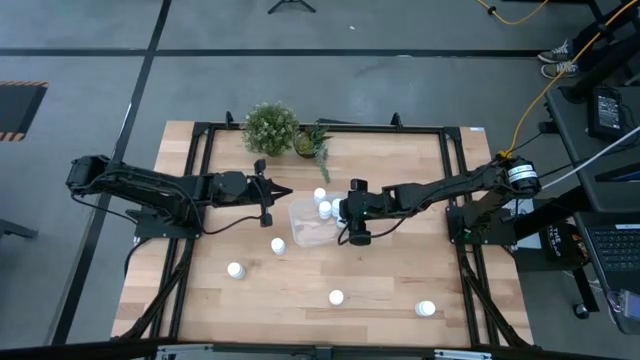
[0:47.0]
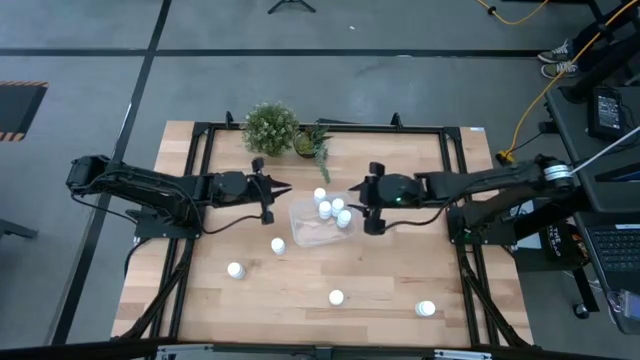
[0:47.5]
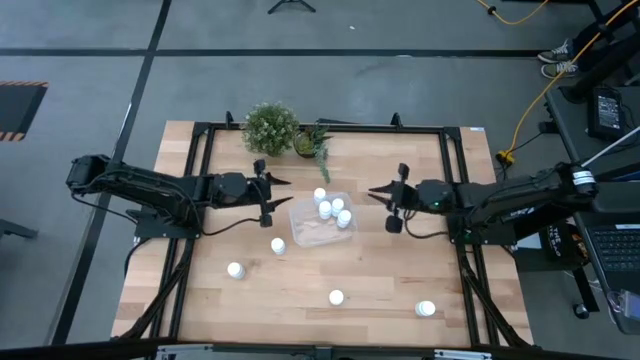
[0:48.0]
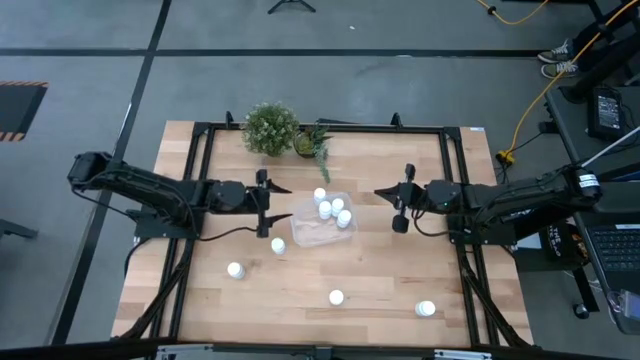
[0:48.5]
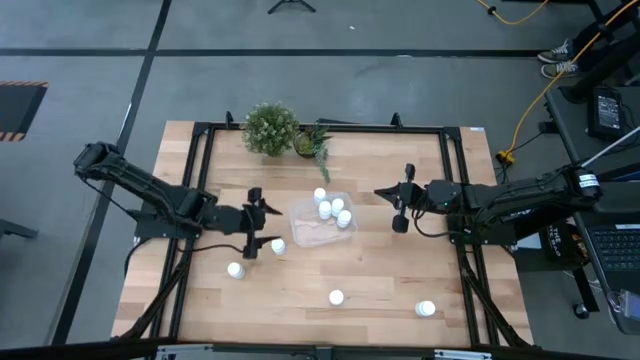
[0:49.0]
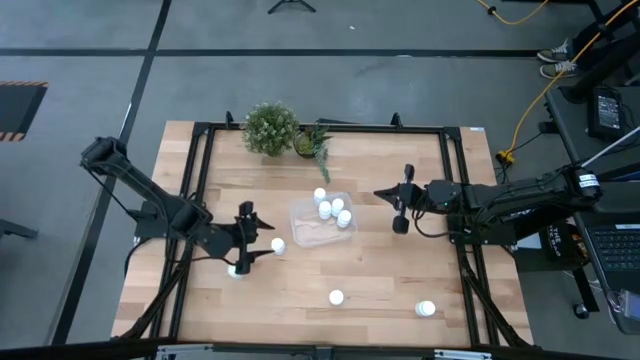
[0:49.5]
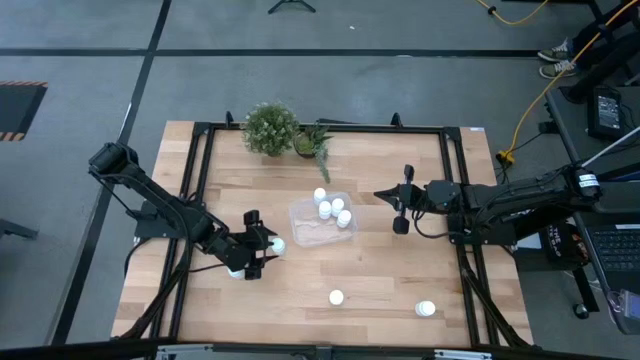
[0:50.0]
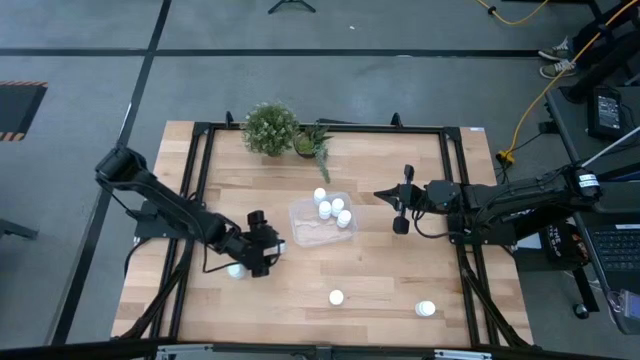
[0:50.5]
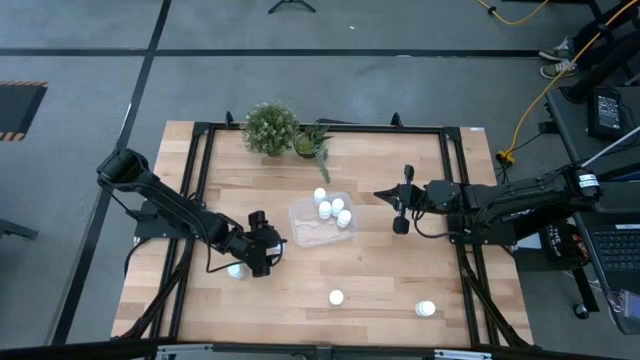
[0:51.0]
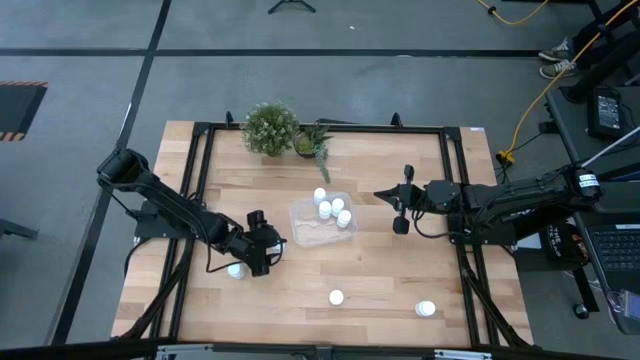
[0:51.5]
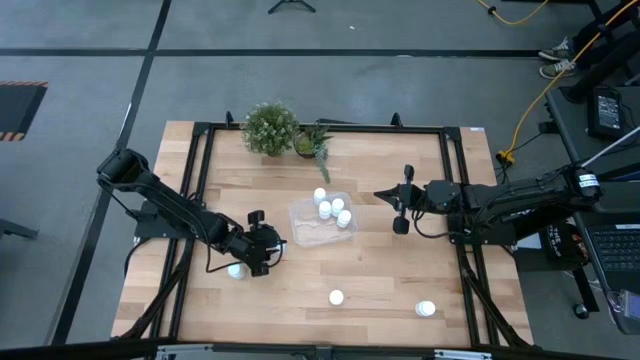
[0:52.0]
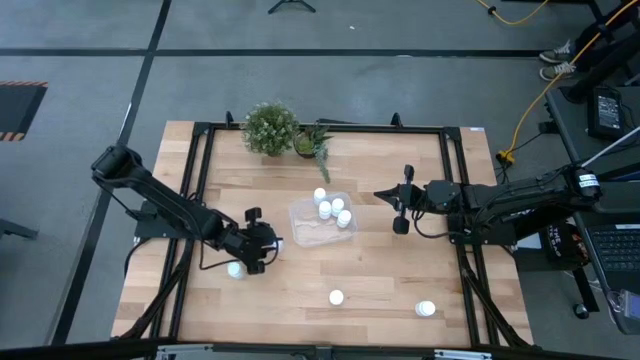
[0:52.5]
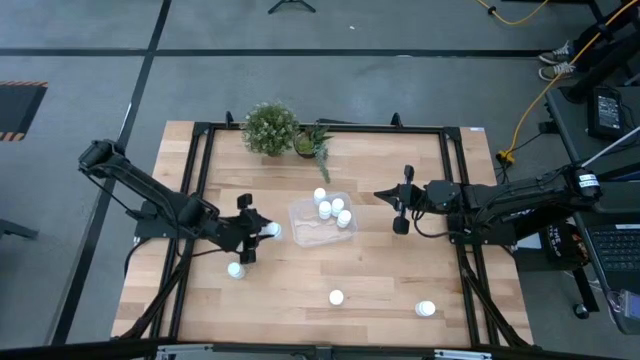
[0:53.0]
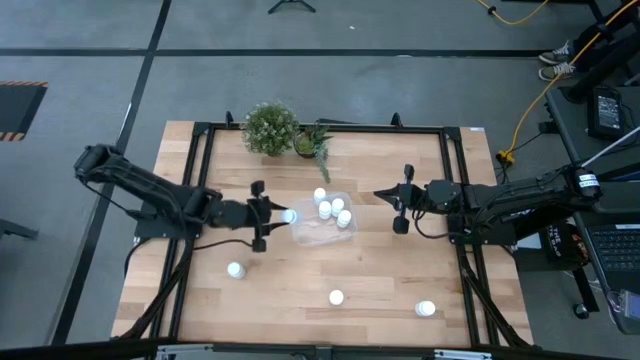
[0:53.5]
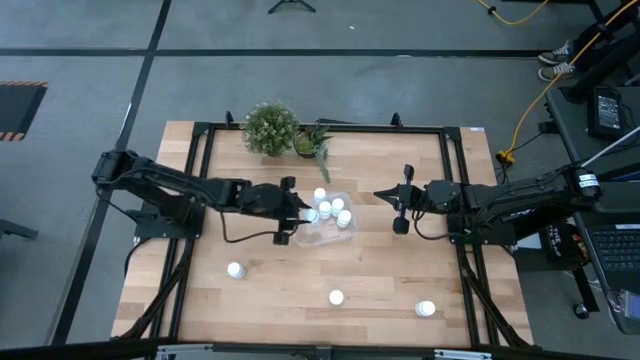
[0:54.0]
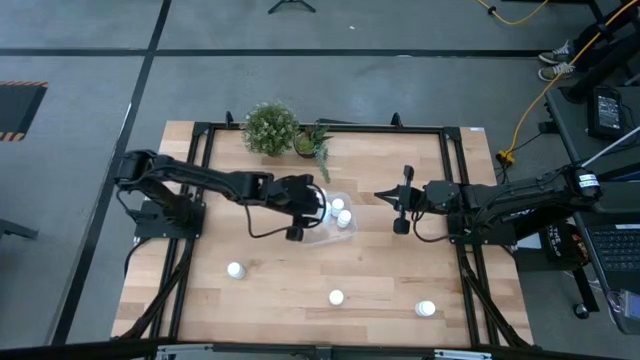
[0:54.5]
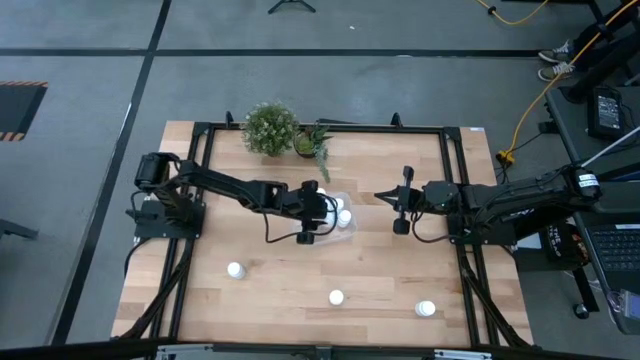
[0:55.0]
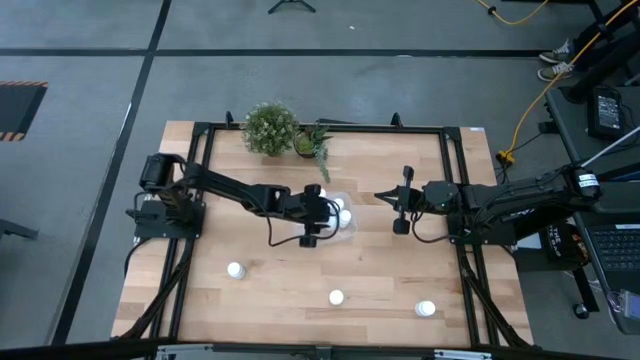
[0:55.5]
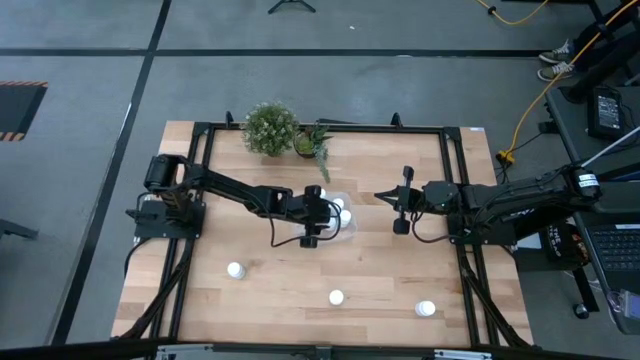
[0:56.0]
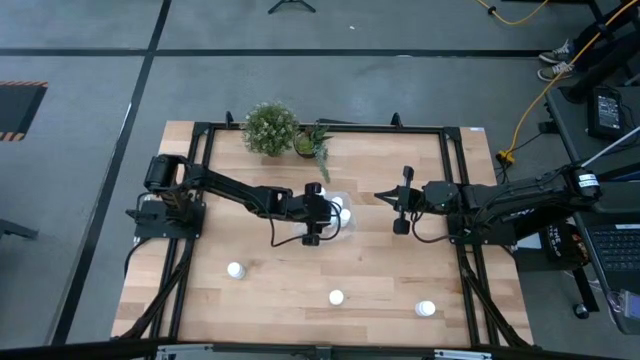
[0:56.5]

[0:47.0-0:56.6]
Task: Pick and place pill bottles into a basket
Put the white pill bottle into the transparent bin

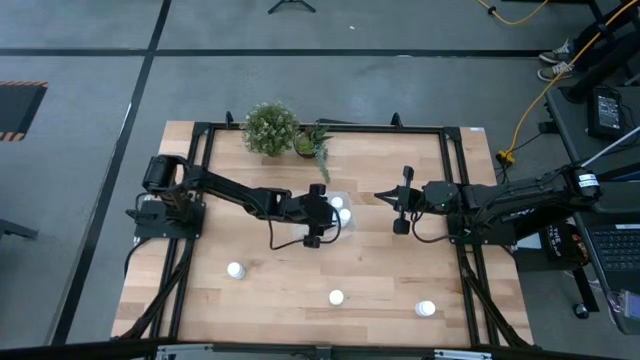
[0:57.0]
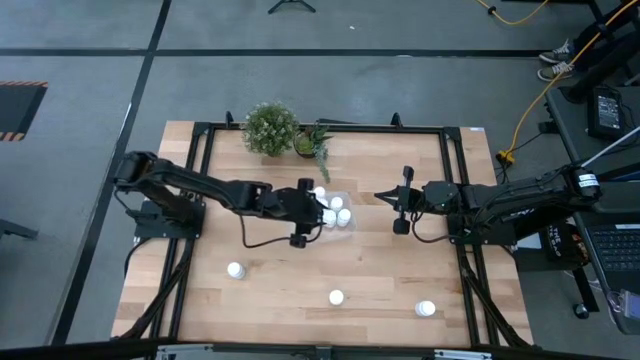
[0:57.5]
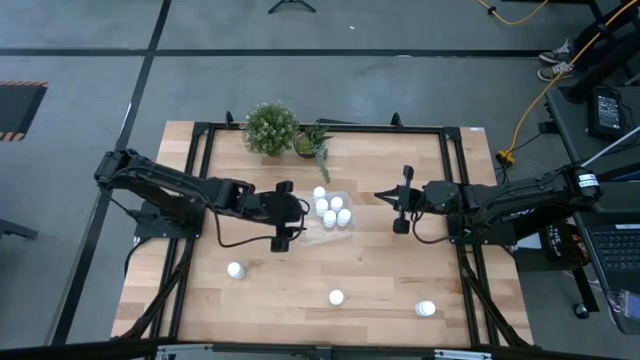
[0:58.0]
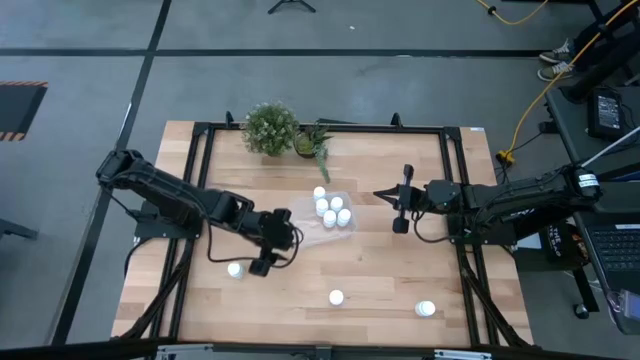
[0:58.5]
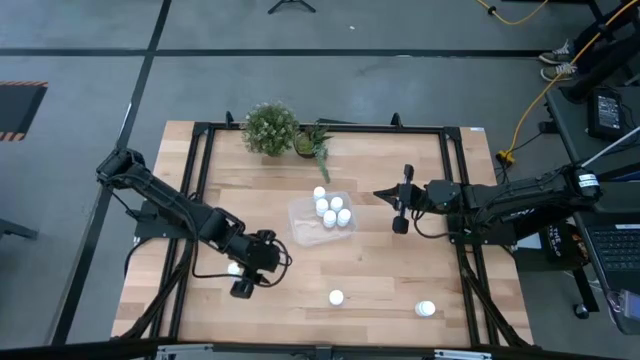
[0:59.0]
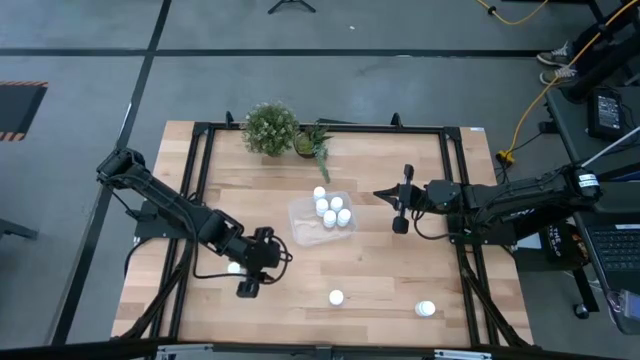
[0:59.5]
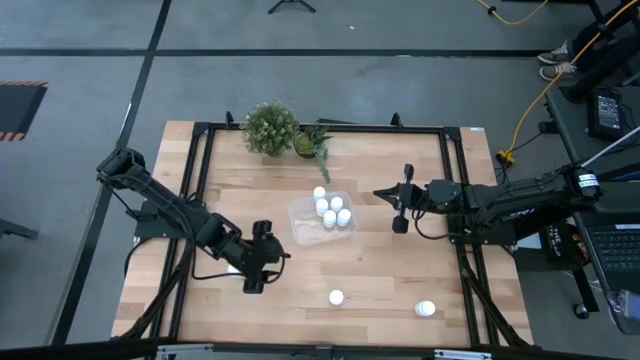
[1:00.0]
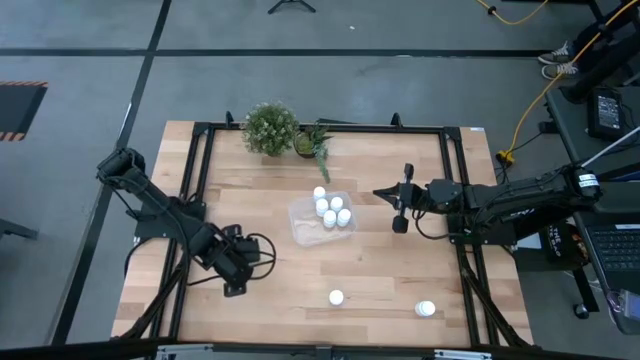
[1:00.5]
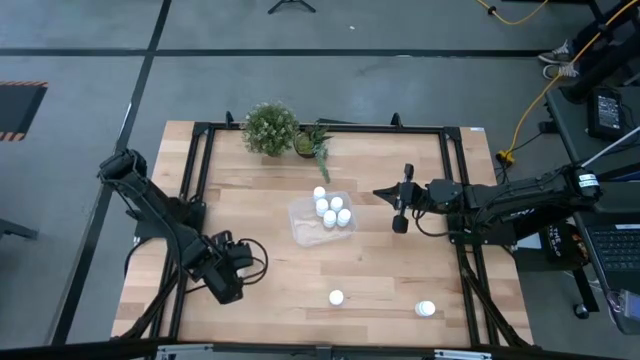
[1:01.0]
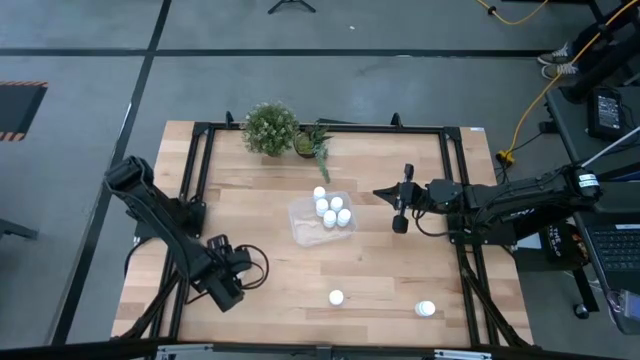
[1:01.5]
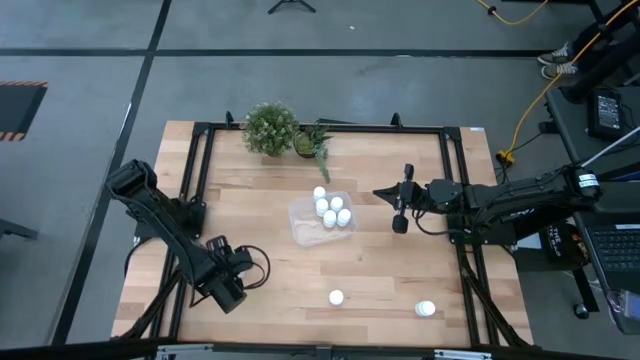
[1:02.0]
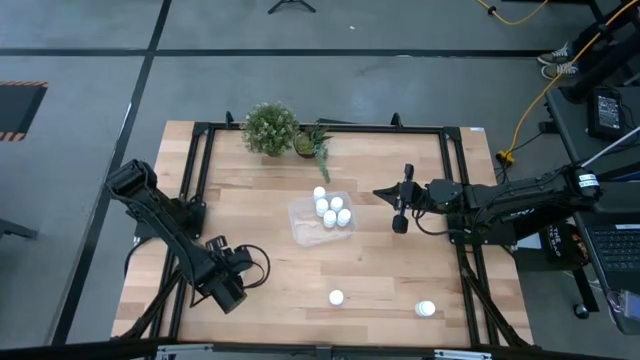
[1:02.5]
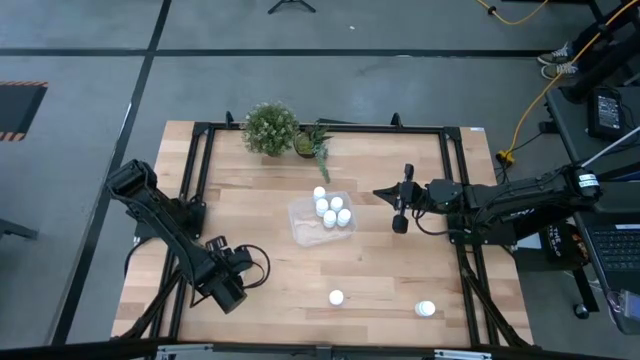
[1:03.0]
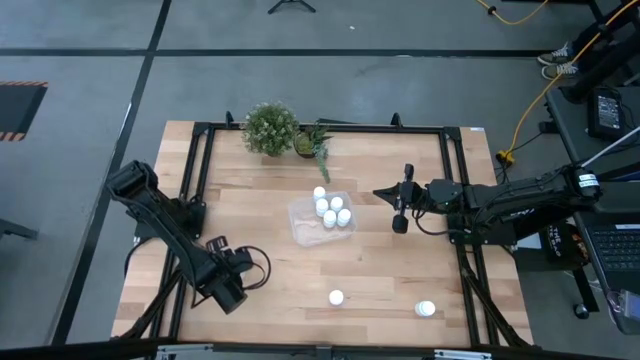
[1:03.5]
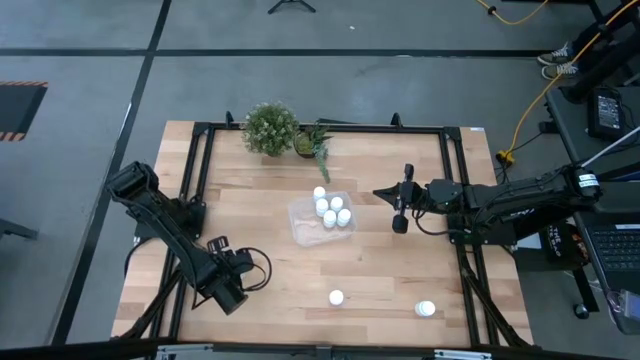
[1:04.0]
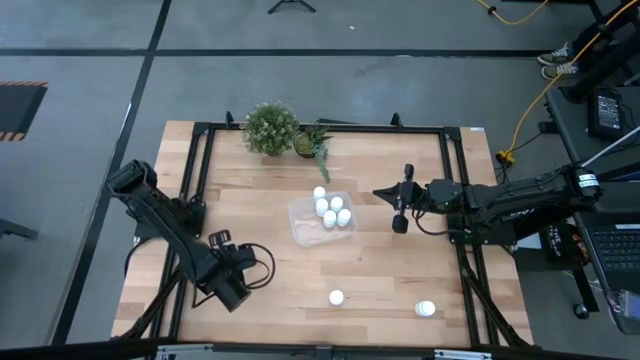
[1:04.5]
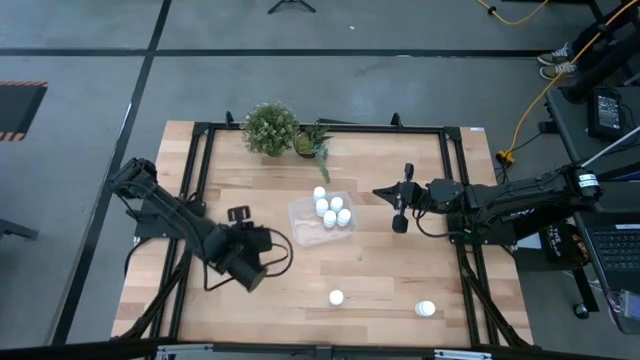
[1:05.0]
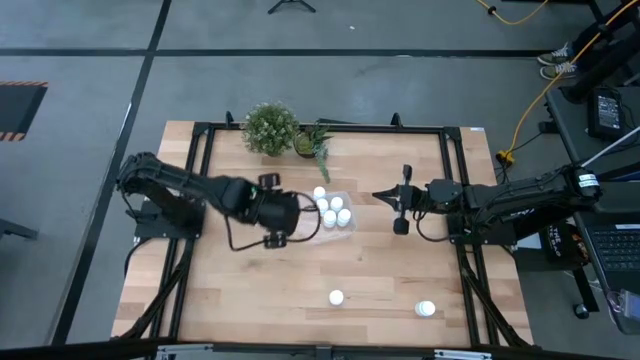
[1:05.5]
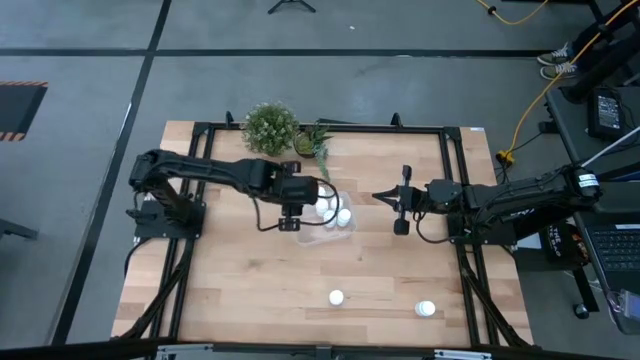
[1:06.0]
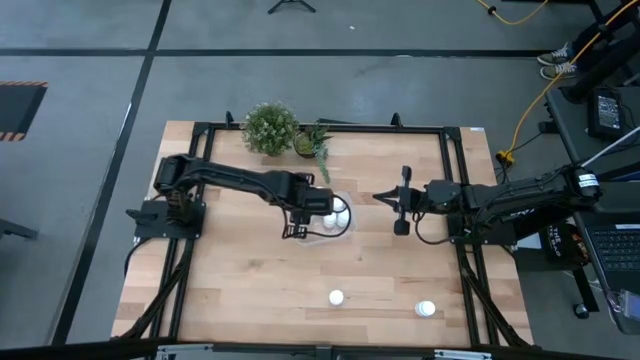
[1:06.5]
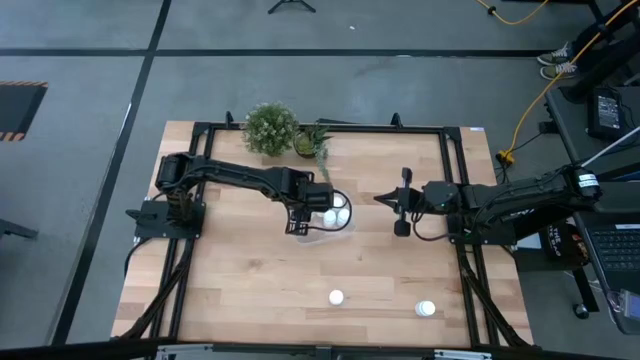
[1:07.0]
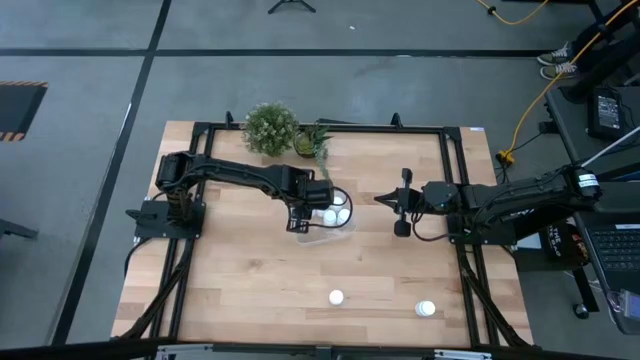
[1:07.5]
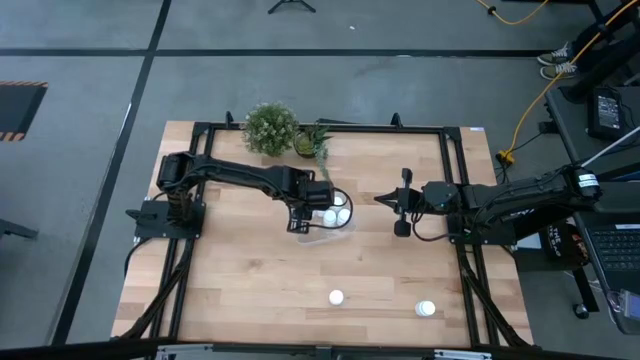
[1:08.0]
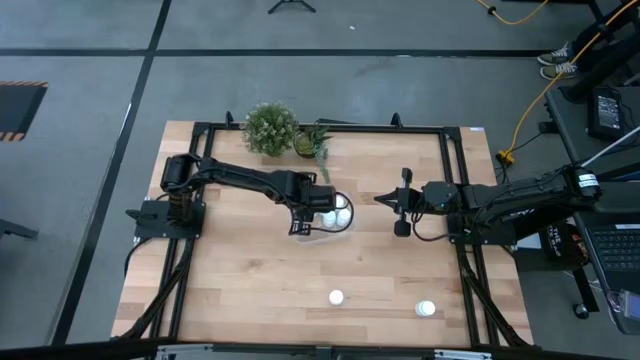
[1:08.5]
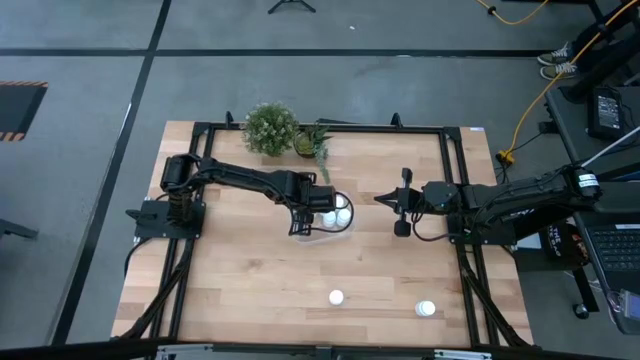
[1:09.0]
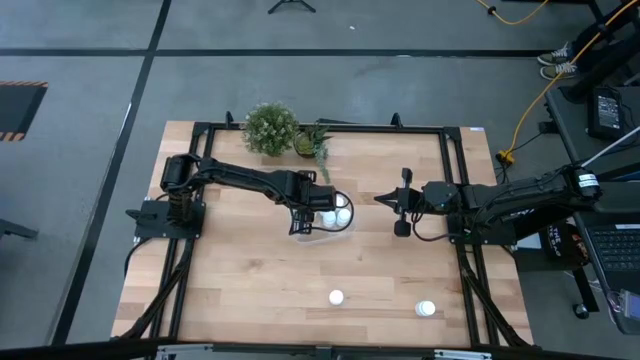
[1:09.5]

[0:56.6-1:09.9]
Put the white pill bottle into the transparent bin
